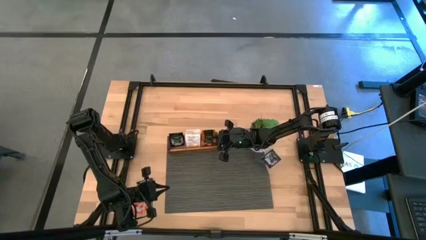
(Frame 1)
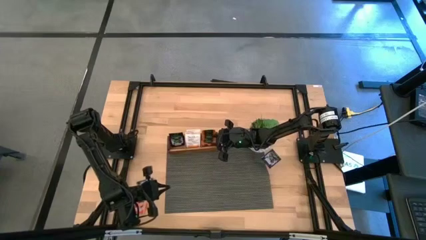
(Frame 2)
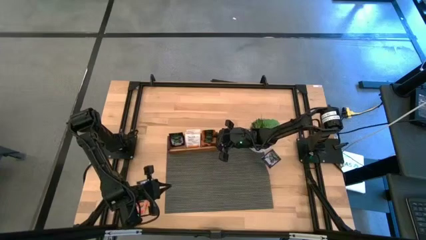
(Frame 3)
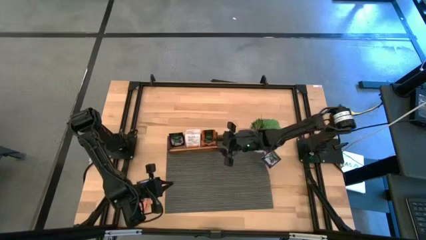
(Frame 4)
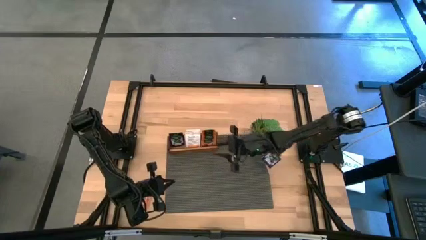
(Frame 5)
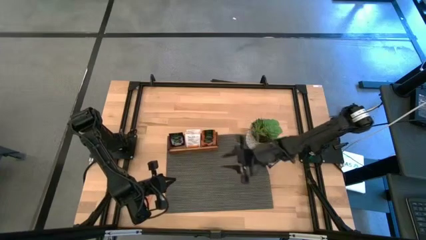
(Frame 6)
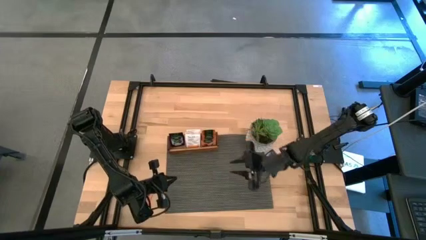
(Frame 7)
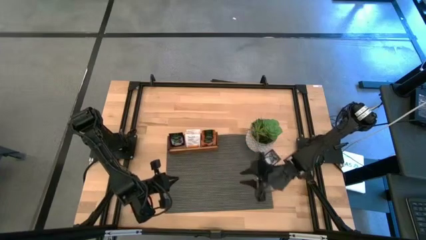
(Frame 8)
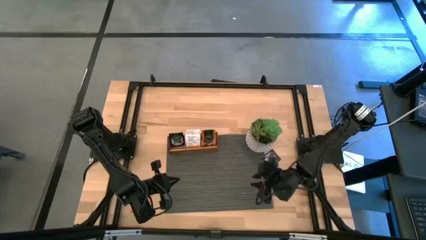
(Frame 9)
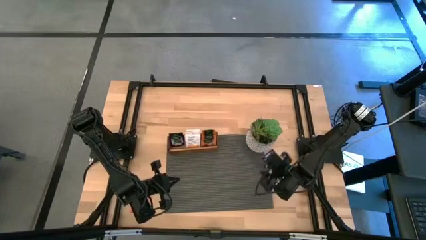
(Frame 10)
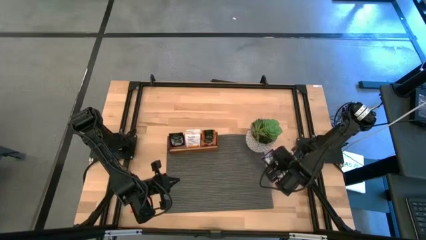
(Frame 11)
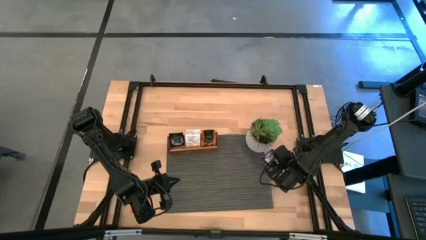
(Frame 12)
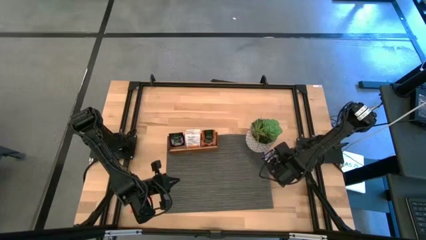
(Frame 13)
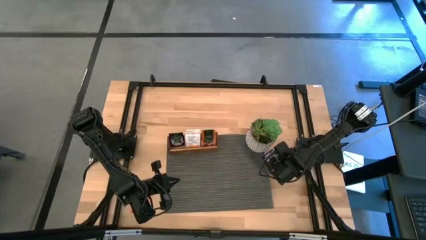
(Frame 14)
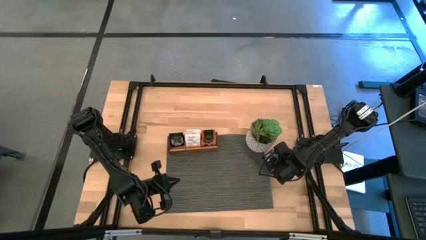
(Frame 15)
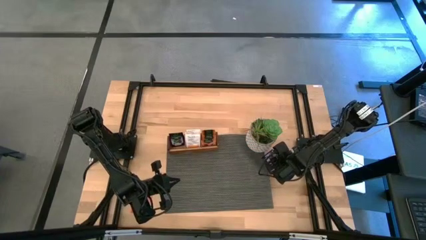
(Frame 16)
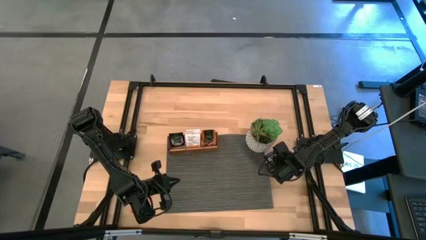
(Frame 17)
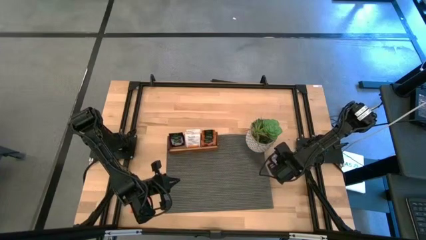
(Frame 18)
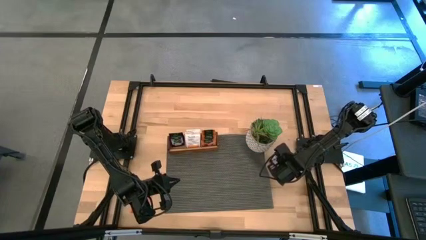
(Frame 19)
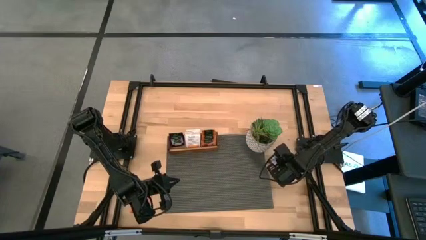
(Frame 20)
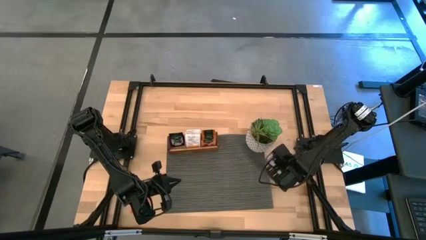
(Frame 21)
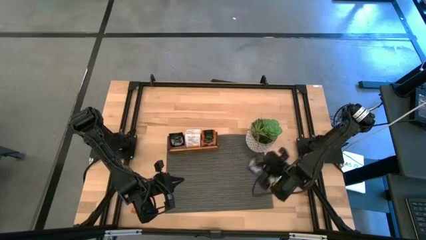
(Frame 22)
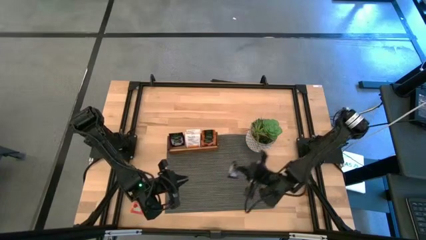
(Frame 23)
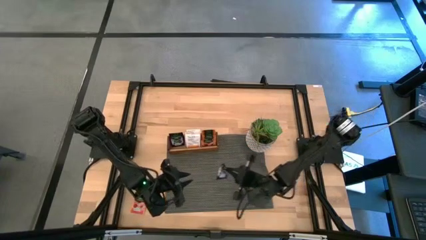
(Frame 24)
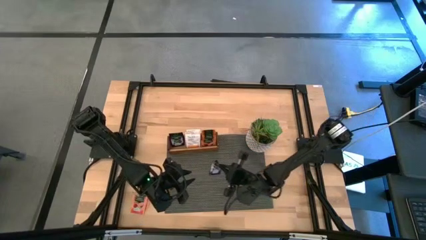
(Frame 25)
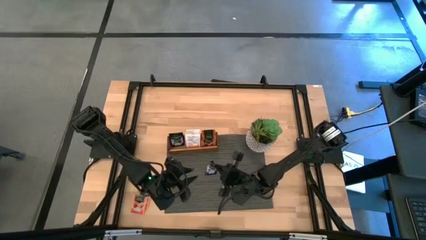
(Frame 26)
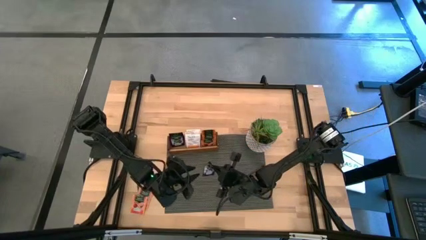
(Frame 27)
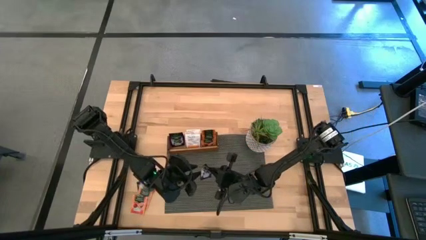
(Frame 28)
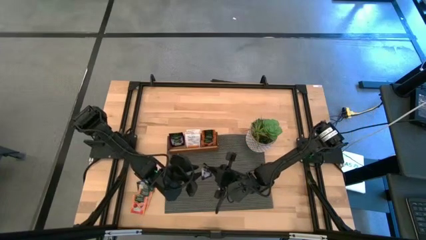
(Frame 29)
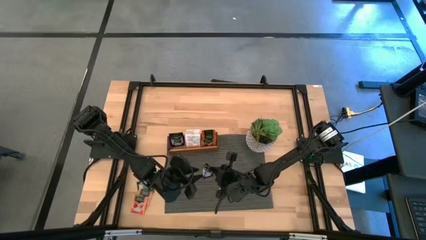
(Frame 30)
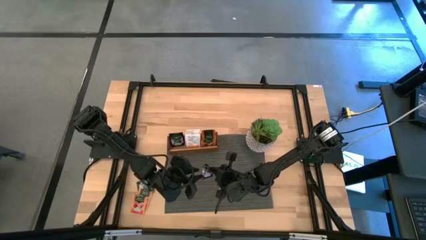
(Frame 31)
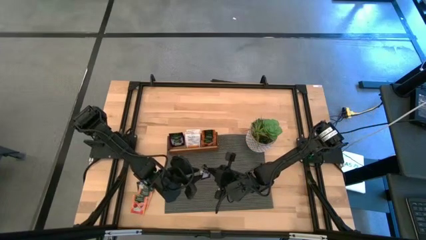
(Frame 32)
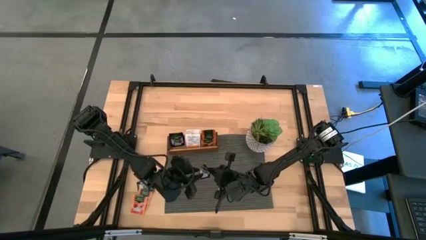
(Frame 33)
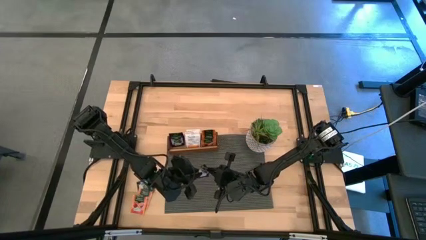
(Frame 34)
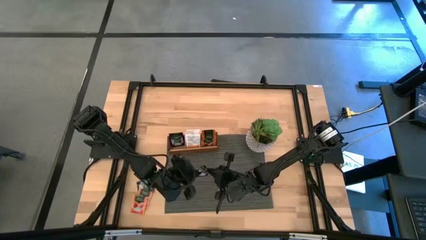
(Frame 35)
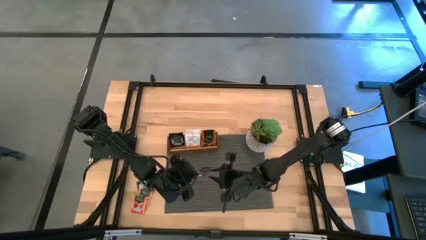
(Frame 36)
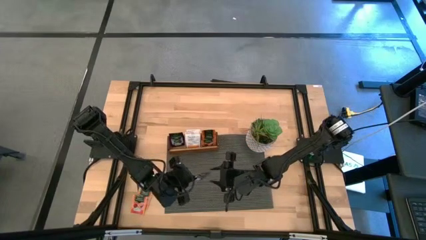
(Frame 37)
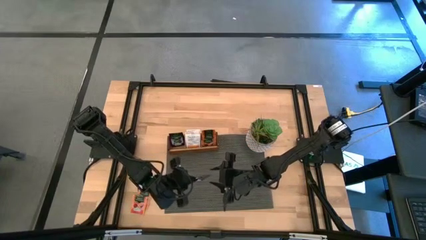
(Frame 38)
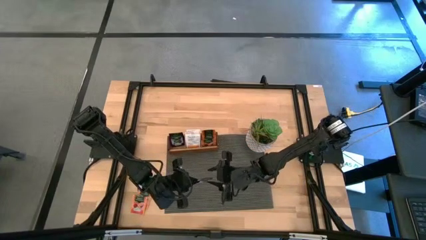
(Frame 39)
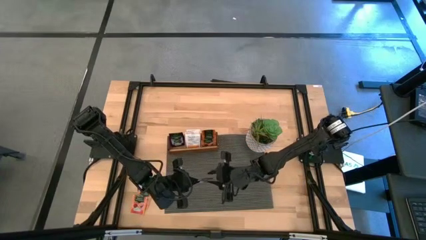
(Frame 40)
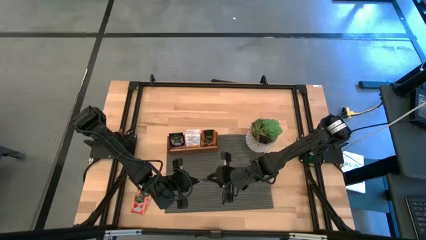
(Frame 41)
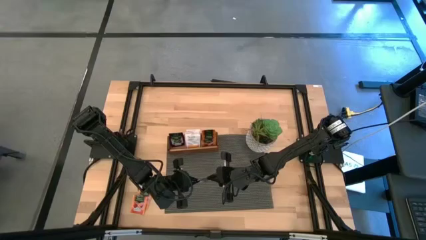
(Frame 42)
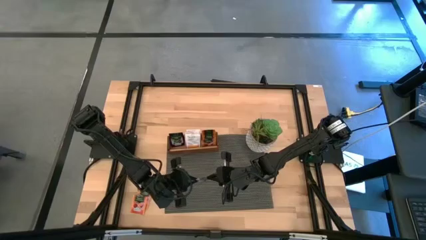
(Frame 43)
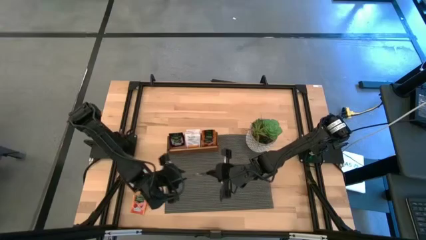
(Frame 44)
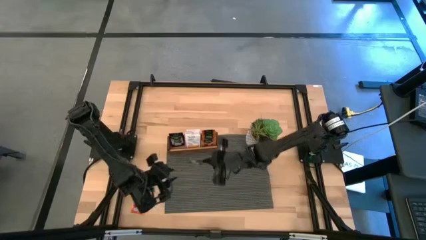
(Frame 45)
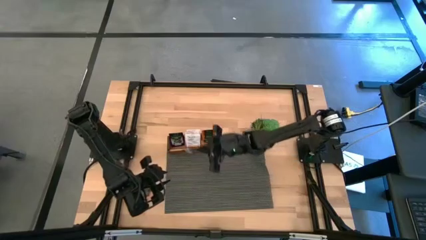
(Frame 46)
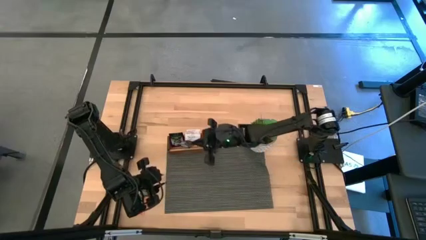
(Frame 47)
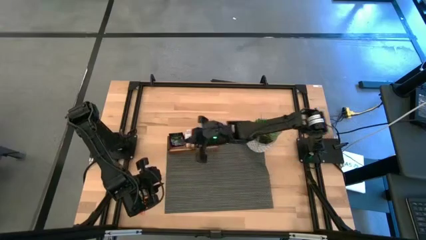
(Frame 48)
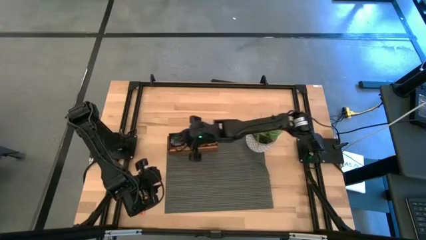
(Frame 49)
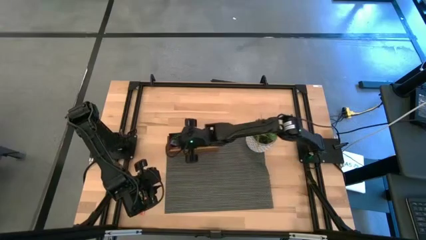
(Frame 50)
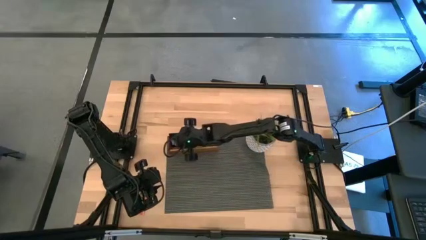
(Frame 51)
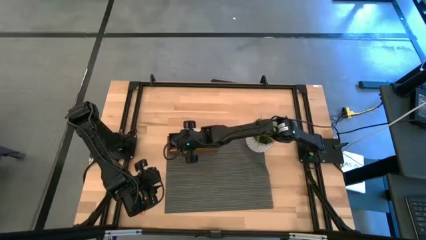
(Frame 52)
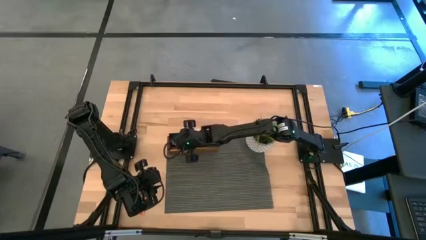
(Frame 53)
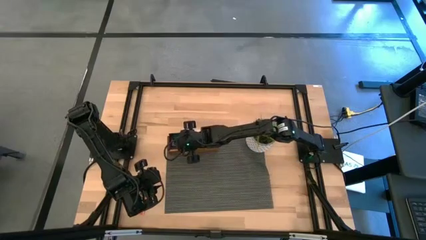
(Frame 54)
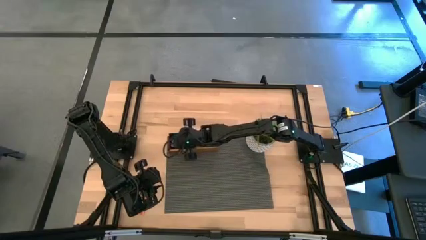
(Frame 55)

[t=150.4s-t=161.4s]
Task: Pick & Place Tea
Put the violet tea bag to the left section of the wooden organizer

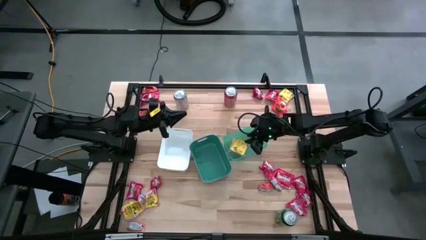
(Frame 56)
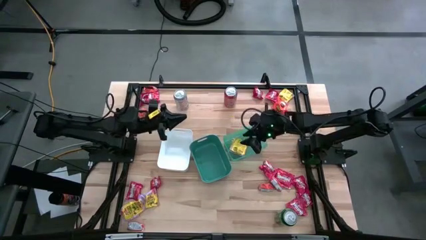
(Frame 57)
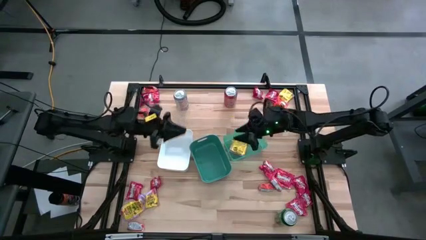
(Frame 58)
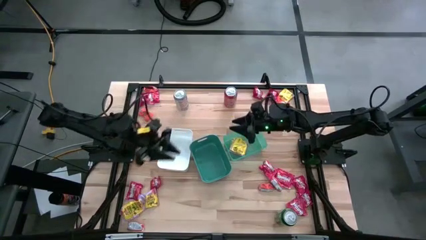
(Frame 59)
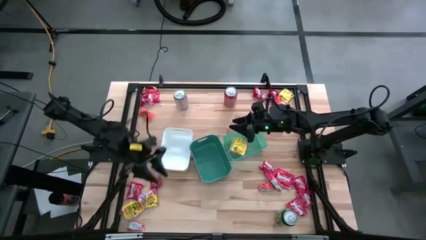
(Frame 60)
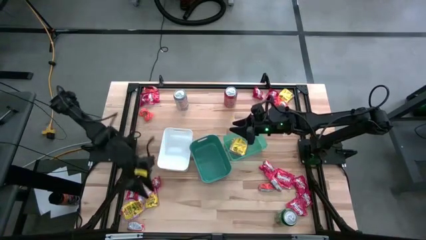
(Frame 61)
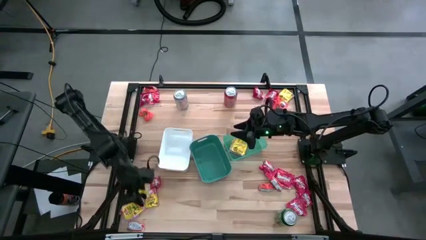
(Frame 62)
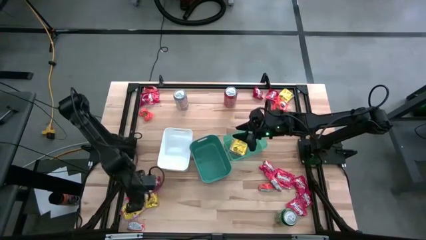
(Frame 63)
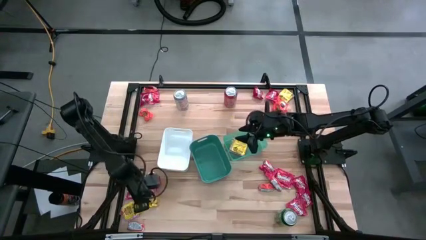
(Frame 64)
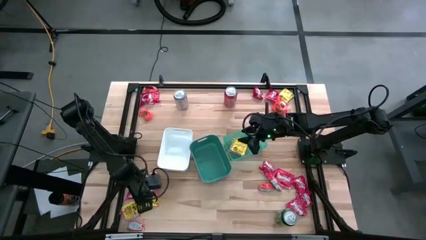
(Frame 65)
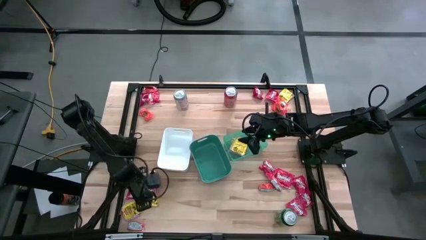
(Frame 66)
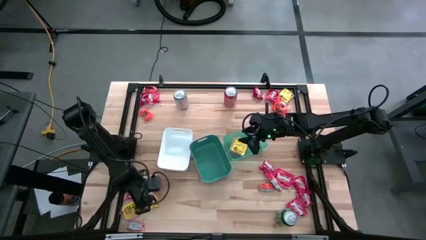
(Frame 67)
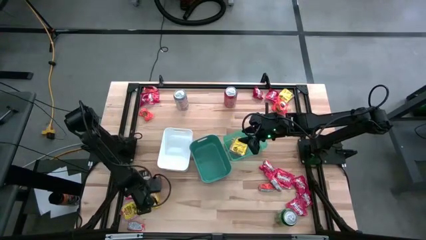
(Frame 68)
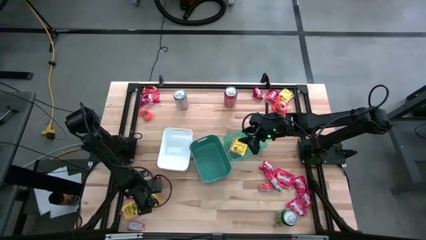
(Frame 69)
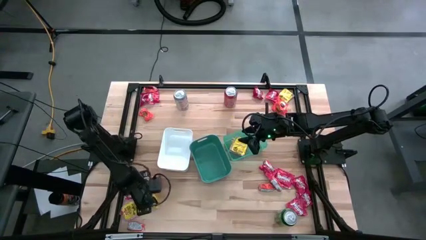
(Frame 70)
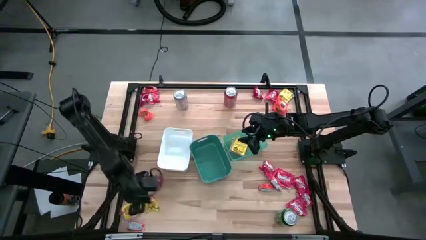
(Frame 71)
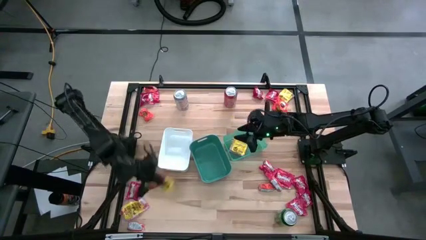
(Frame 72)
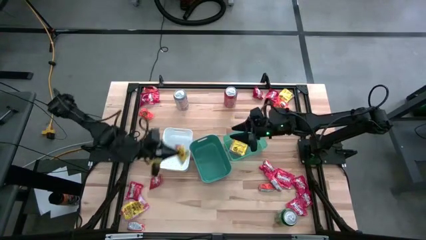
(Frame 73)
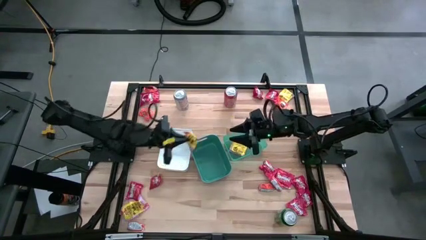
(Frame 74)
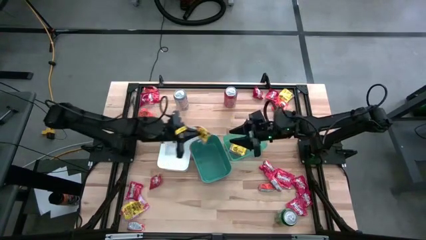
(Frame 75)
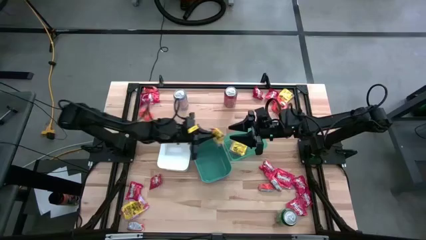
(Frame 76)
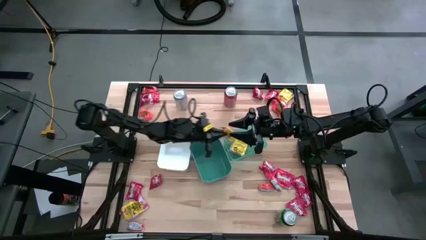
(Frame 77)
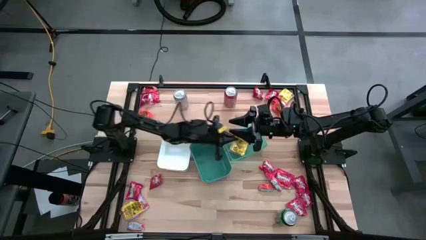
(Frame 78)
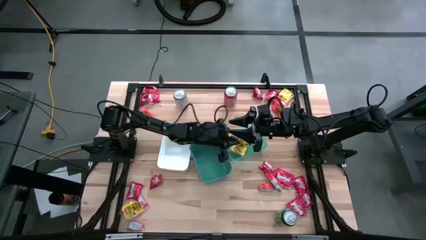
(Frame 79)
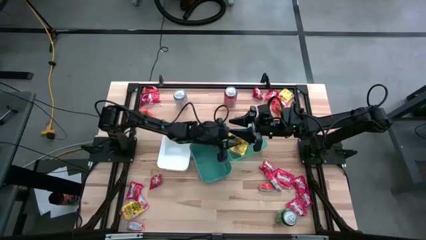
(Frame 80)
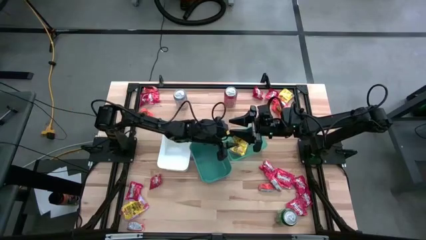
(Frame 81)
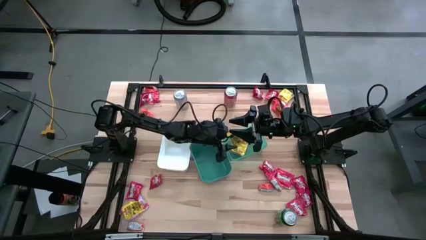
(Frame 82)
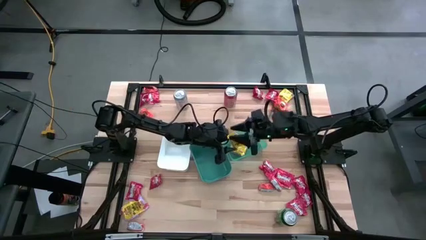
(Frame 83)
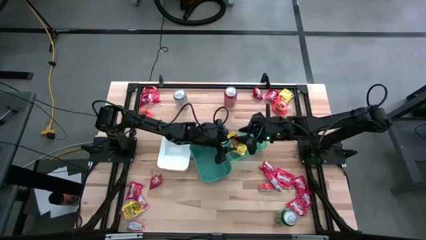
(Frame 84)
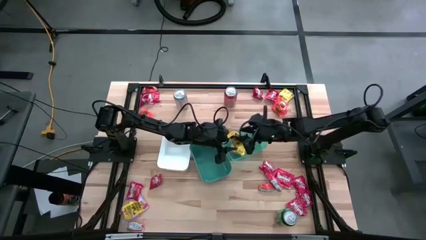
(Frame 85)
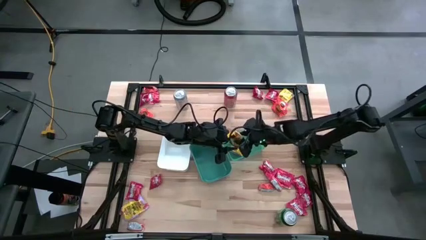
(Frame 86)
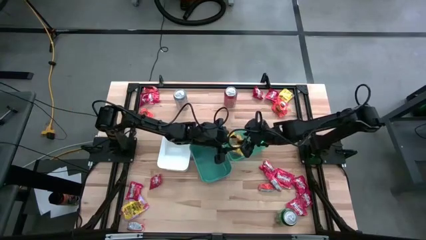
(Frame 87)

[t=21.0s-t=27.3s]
Task: Sort candy
Put the yellow candy into the green transparent bin
